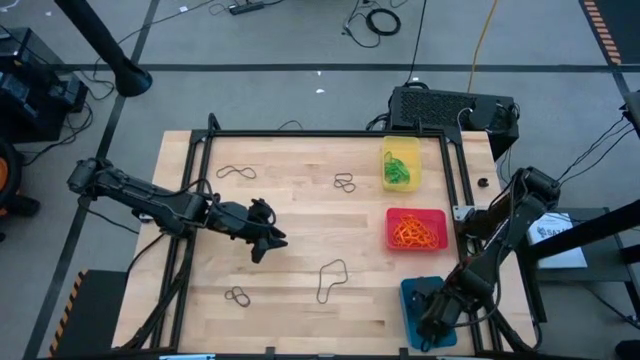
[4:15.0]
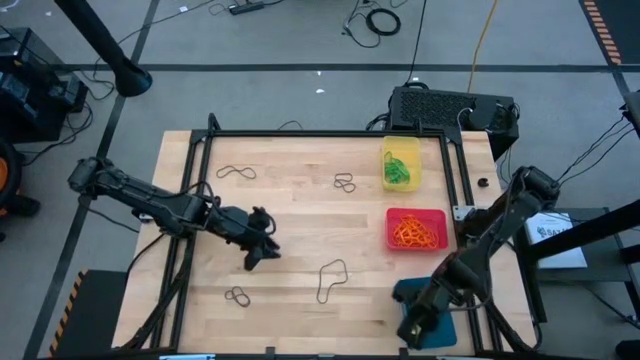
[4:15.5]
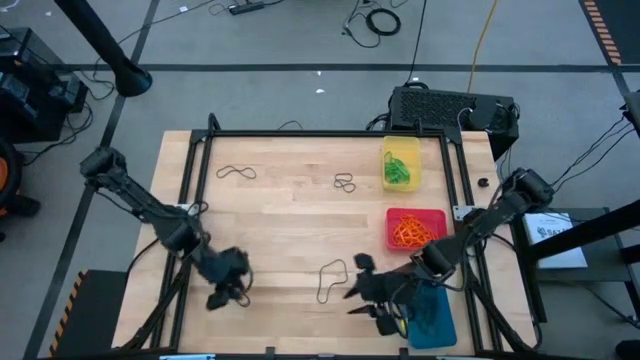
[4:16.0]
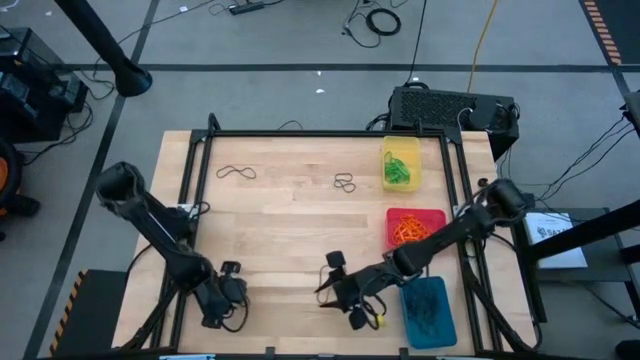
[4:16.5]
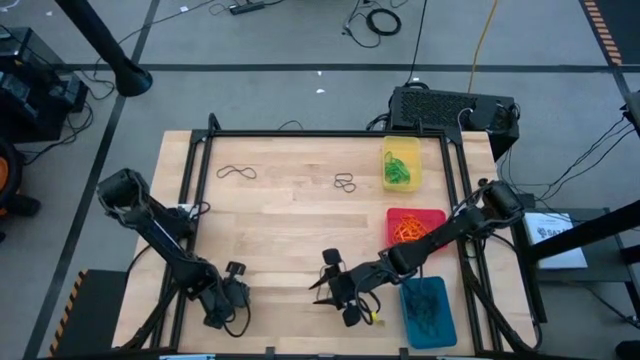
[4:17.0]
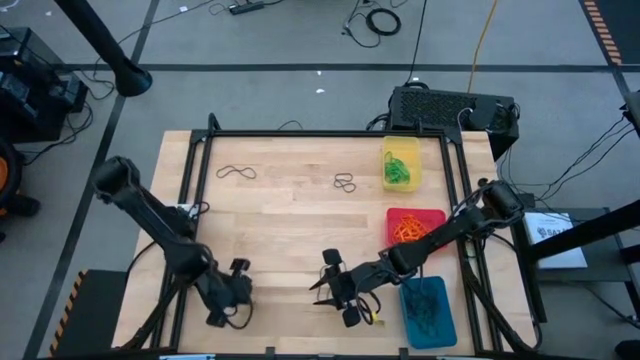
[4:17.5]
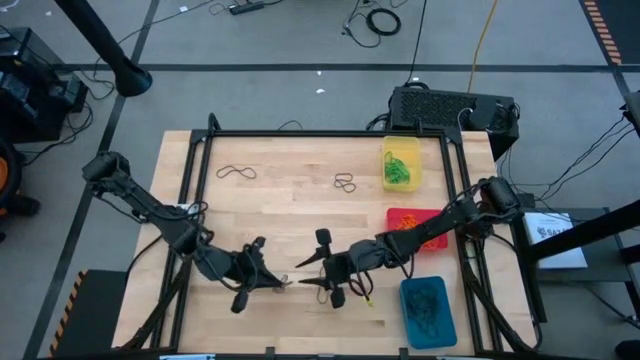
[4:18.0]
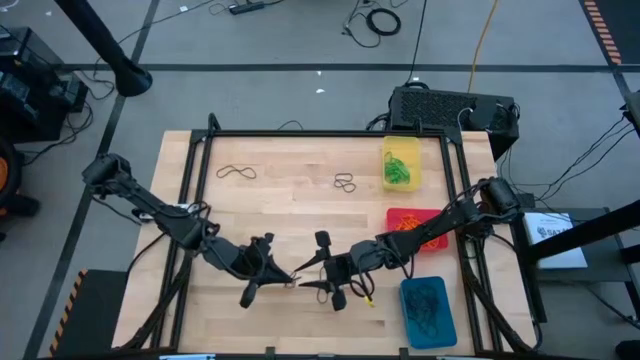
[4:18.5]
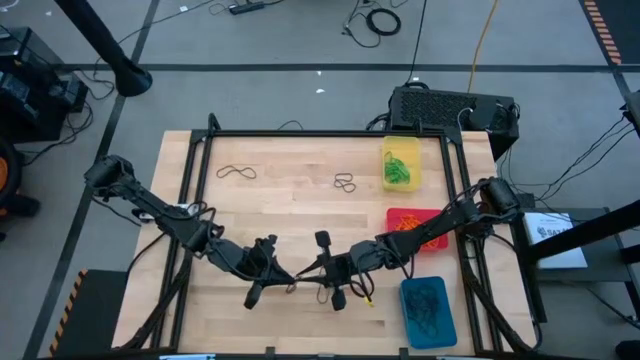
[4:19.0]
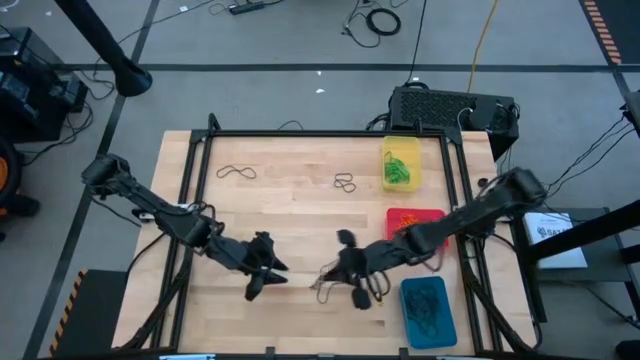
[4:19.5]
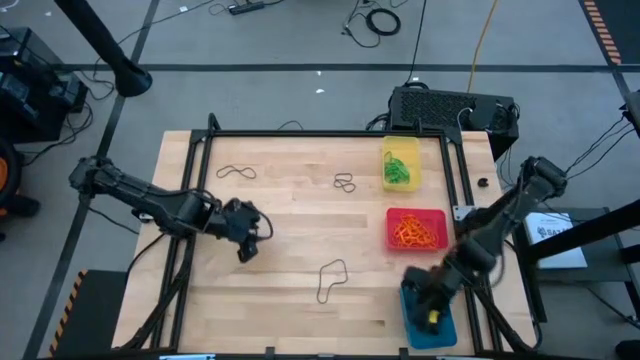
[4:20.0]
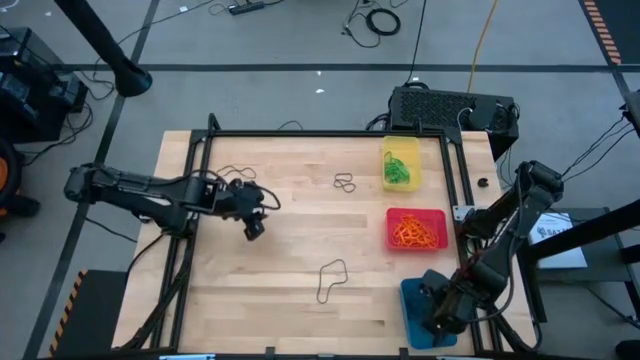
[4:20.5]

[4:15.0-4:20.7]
Task: Sort rubber bands into baskets
Put the violet rubber band into the blue bin

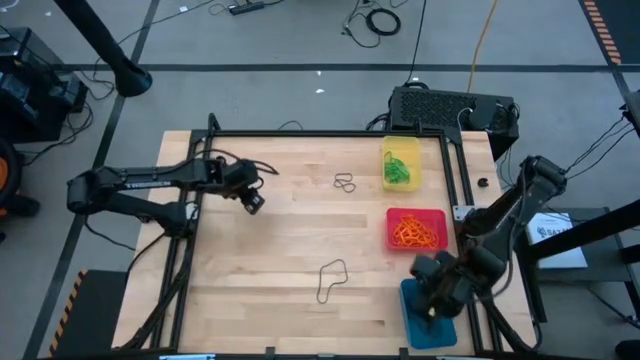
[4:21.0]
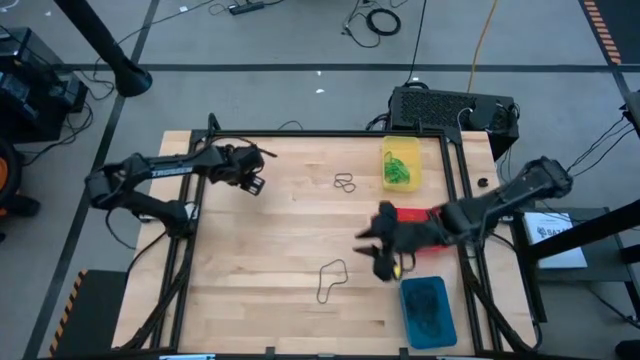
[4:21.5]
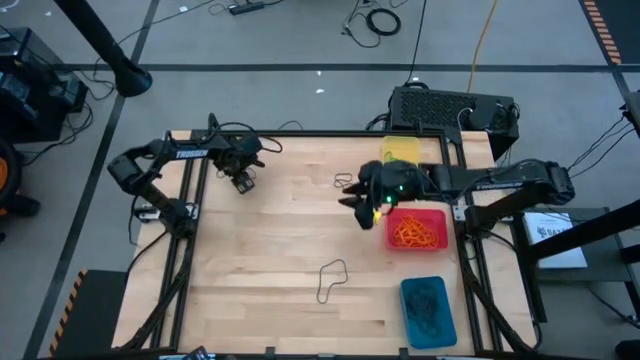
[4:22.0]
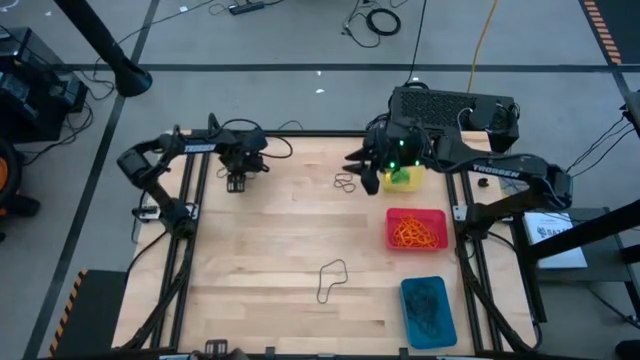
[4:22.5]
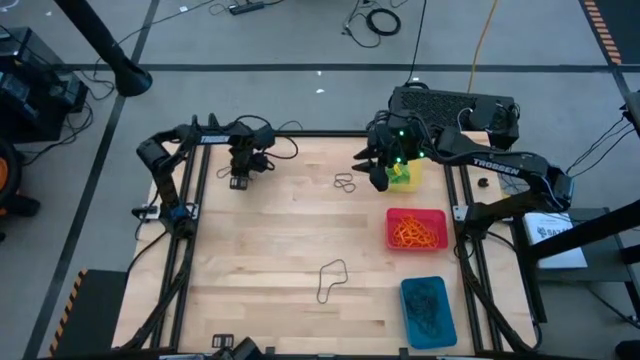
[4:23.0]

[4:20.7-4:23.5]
Put the violet rubber band into the blue bin

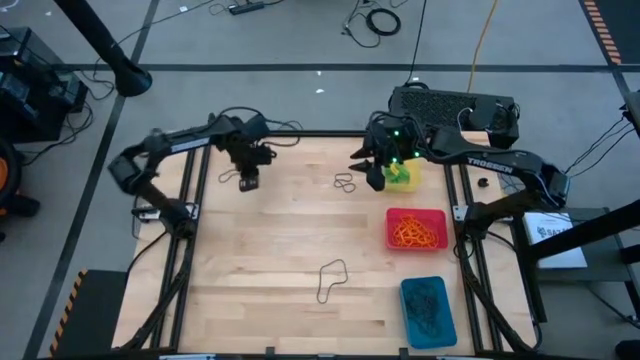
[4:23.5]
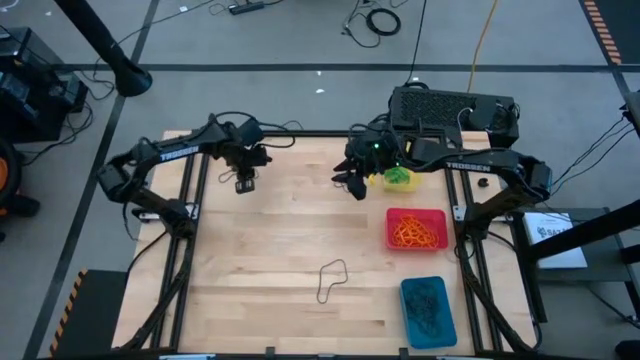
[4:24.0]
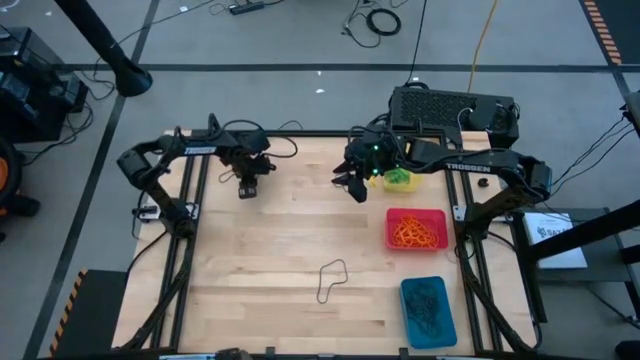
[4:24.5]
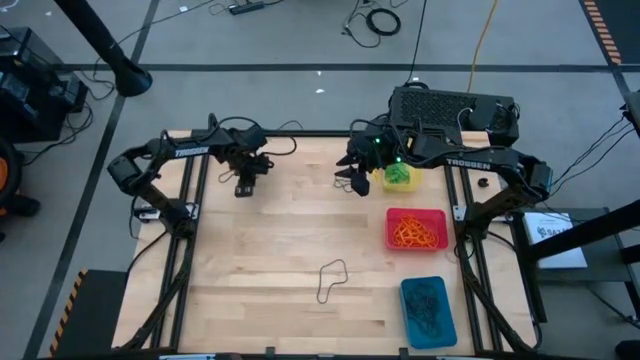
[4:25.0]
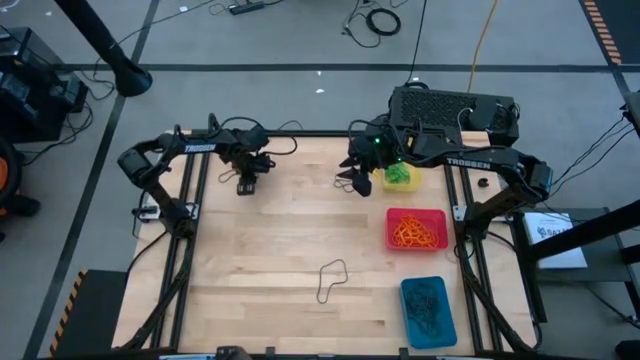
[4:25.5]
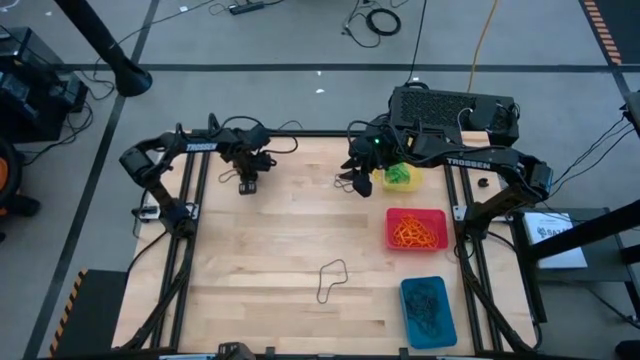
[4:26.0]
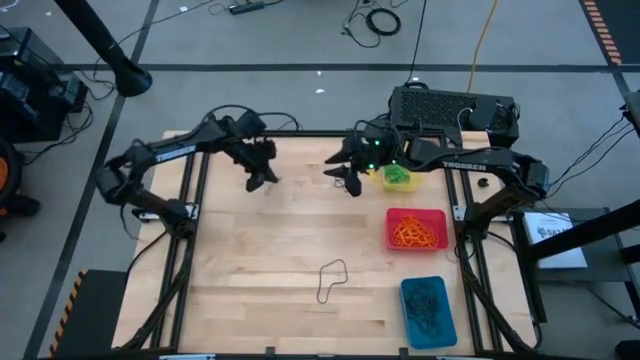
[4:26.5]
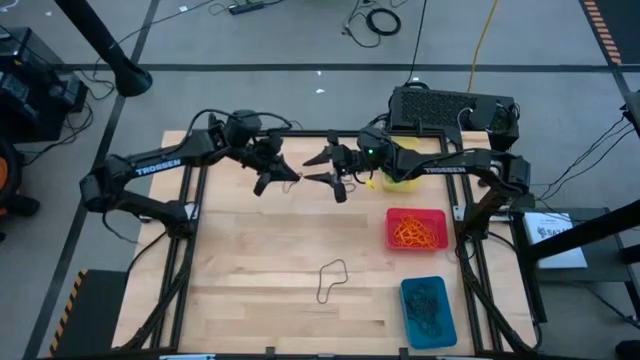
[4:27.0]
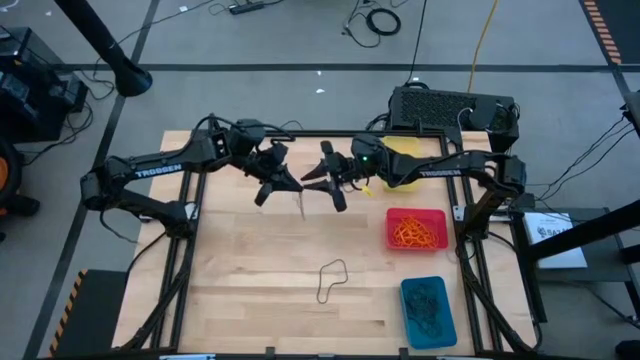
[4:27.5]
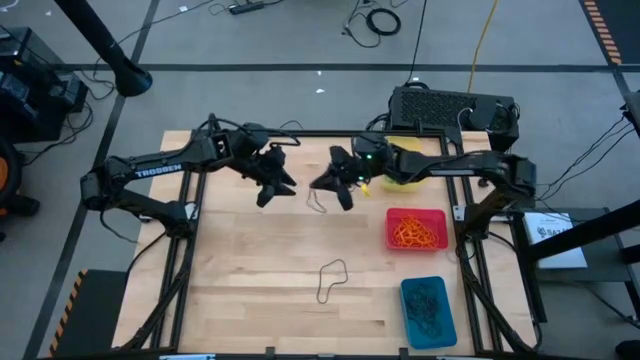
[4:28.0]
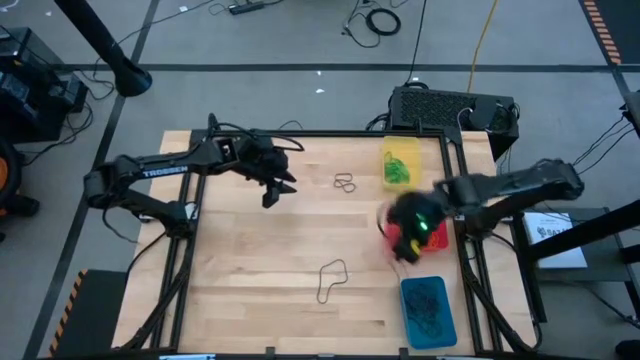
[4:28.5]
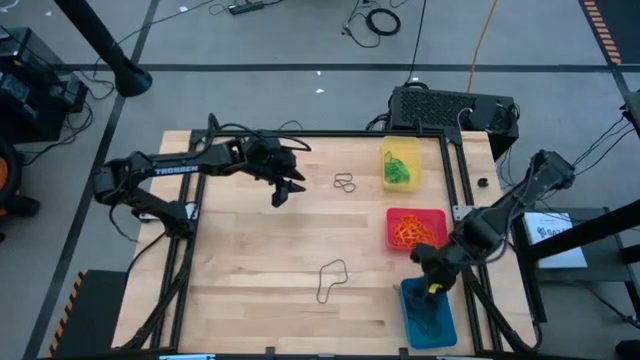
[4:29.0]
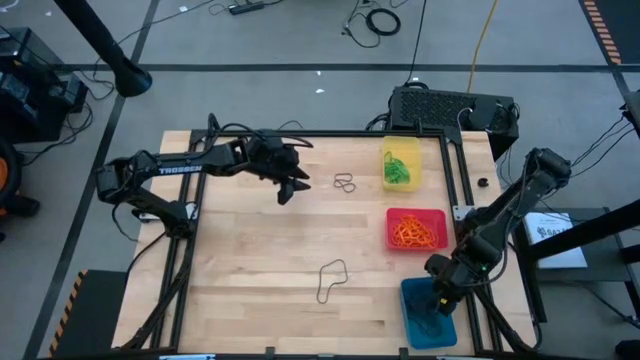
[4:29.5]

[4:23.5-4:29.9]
Put the violet rubber band into the blue bin

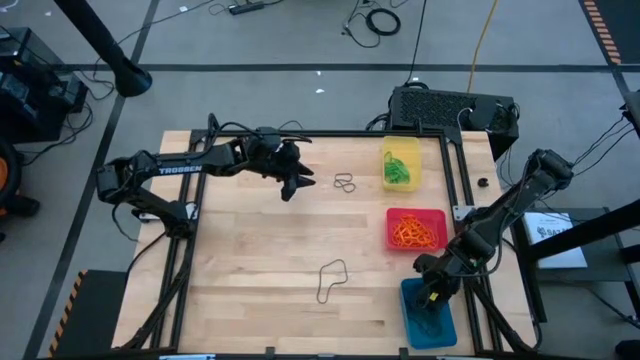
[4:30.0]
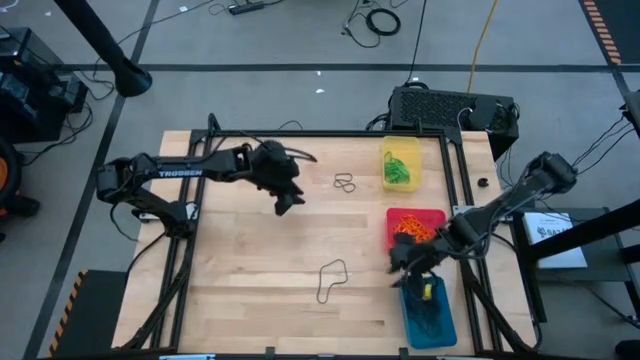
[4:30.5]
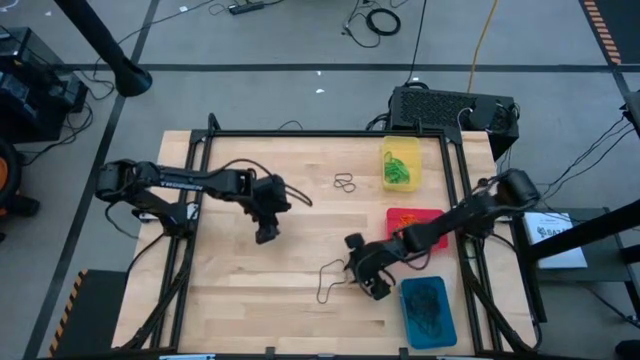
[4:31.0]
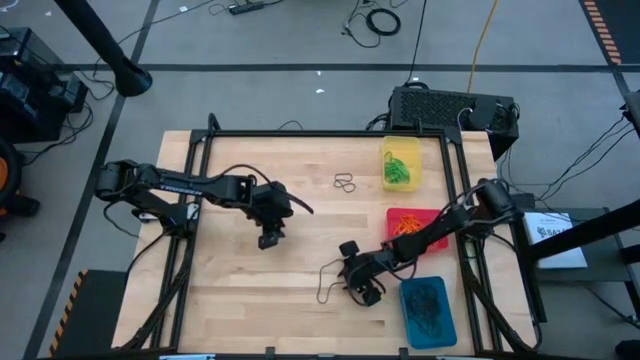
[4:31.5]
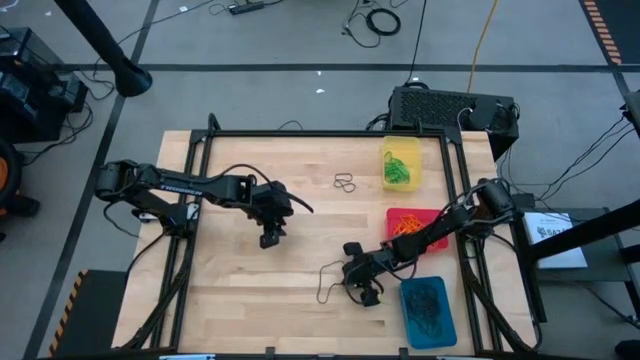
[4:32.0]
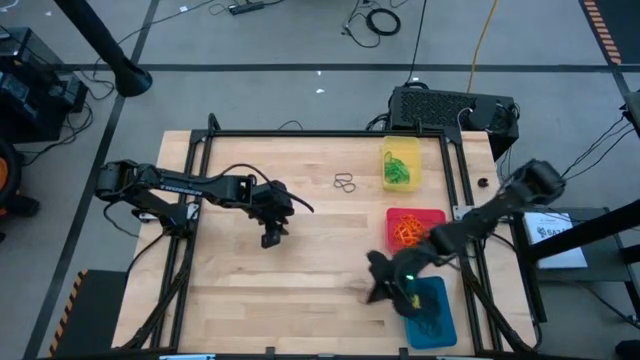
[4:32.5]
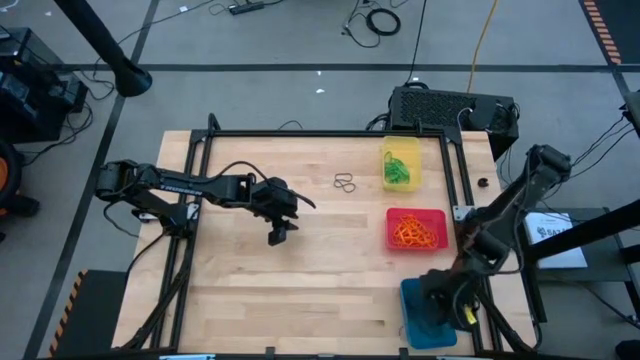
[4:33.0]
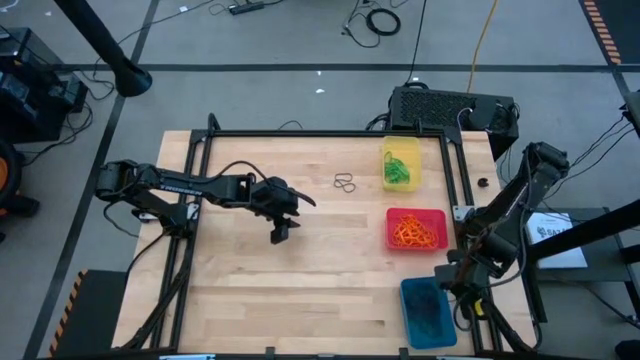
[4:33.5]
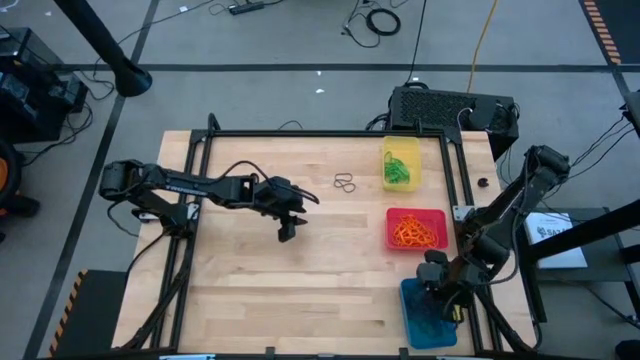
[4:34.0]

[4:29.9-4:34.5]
Put the violet rubber band into the blue bin
